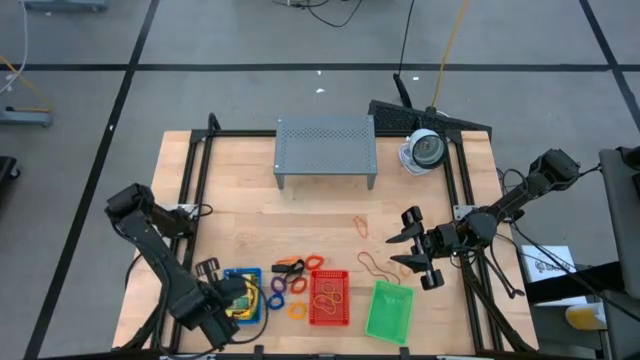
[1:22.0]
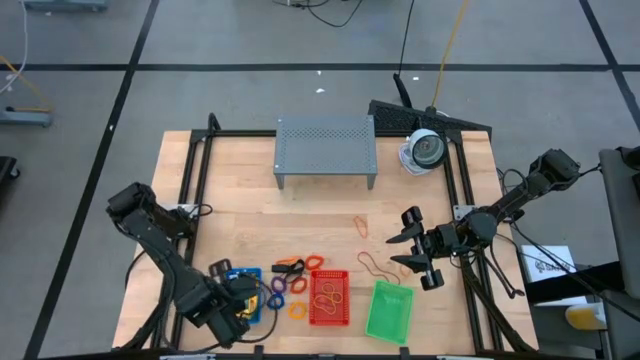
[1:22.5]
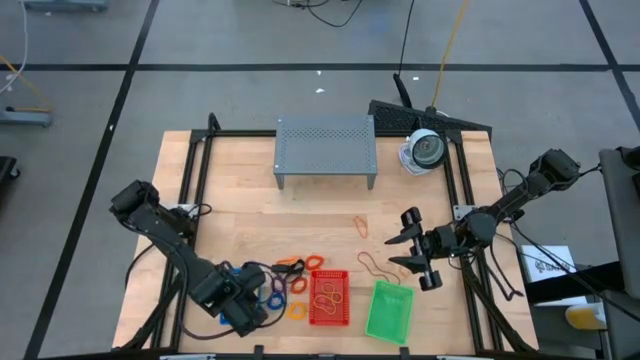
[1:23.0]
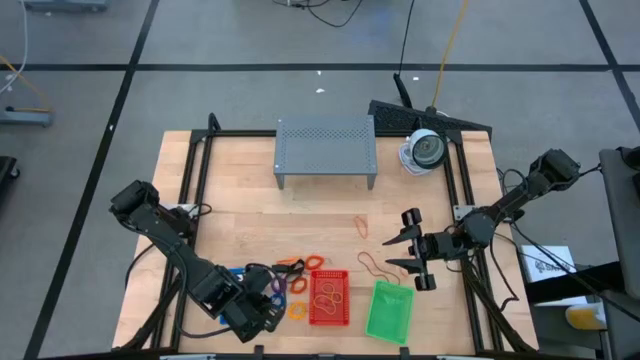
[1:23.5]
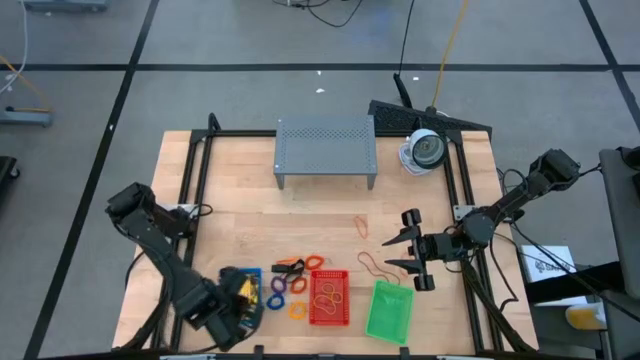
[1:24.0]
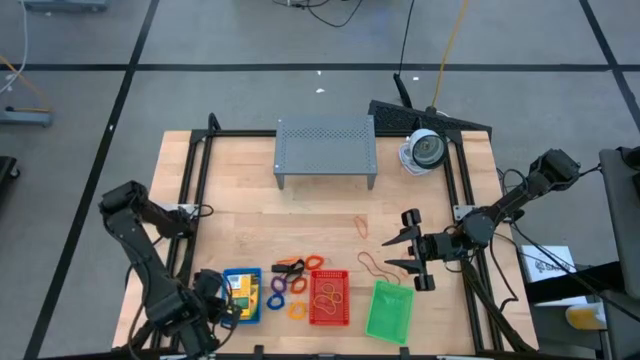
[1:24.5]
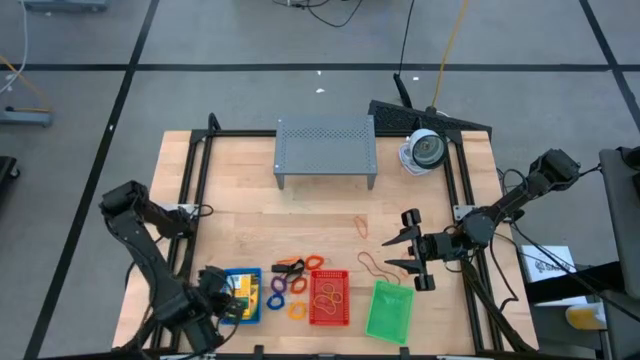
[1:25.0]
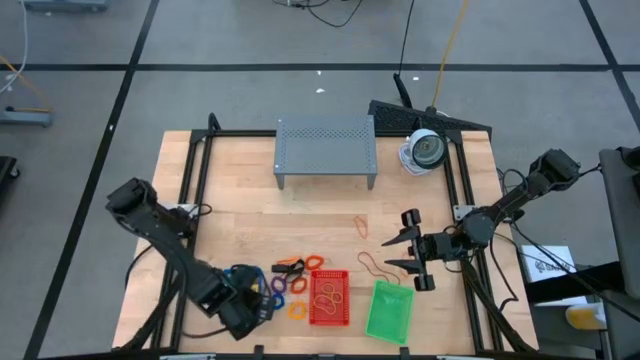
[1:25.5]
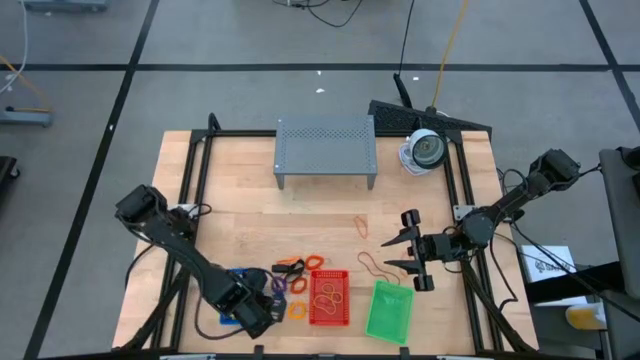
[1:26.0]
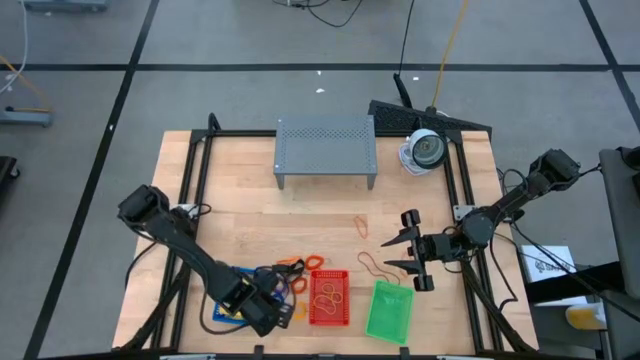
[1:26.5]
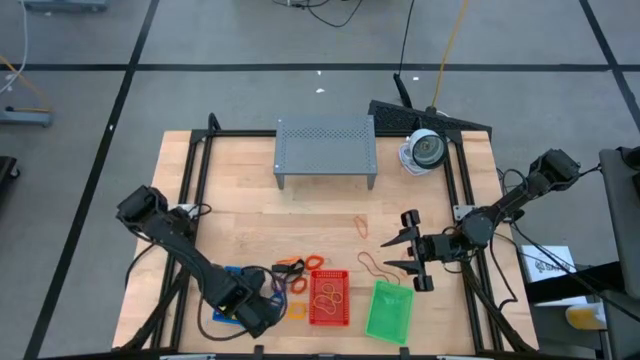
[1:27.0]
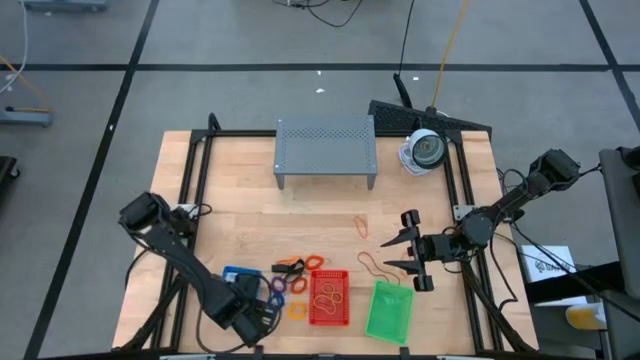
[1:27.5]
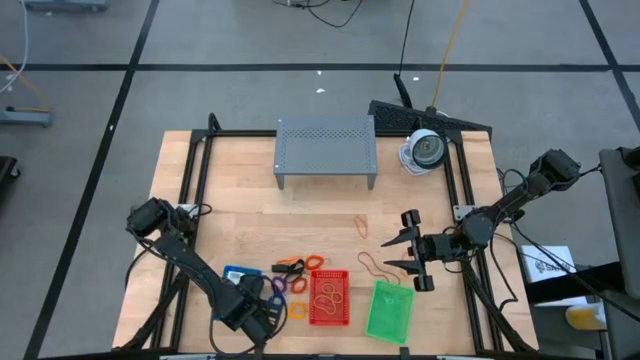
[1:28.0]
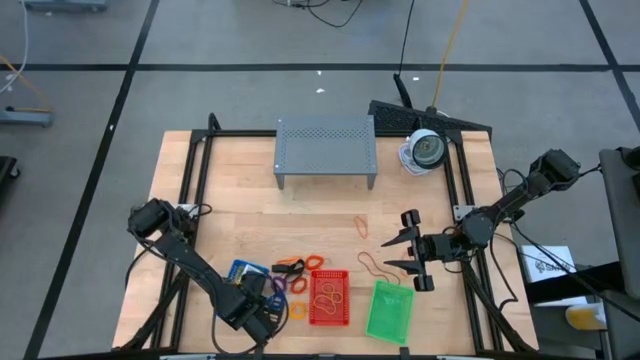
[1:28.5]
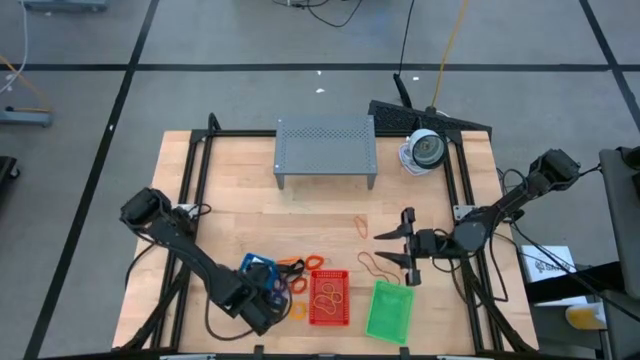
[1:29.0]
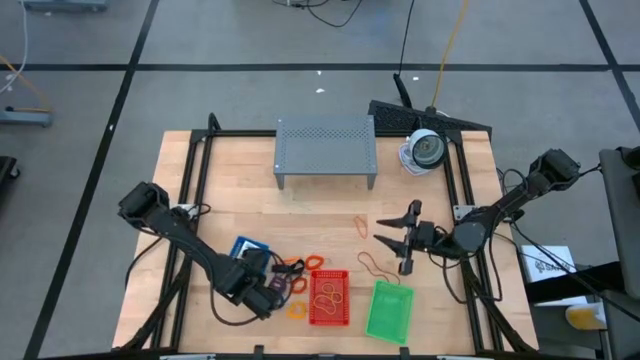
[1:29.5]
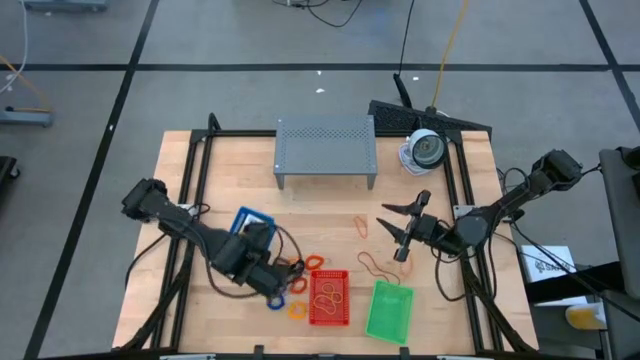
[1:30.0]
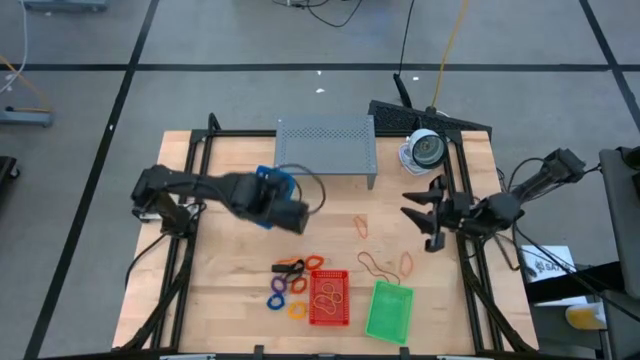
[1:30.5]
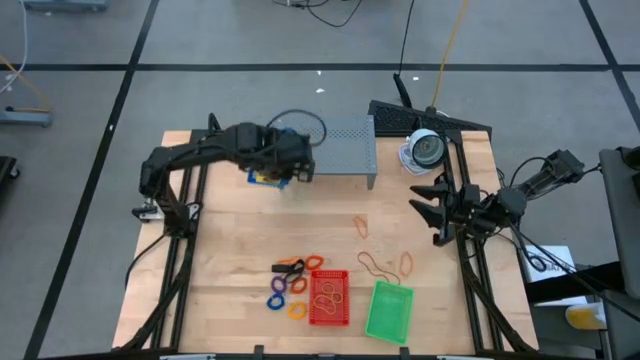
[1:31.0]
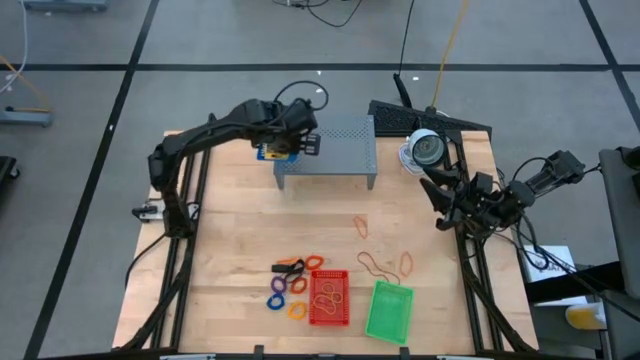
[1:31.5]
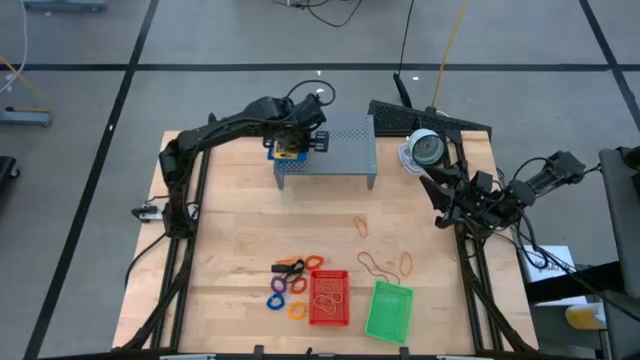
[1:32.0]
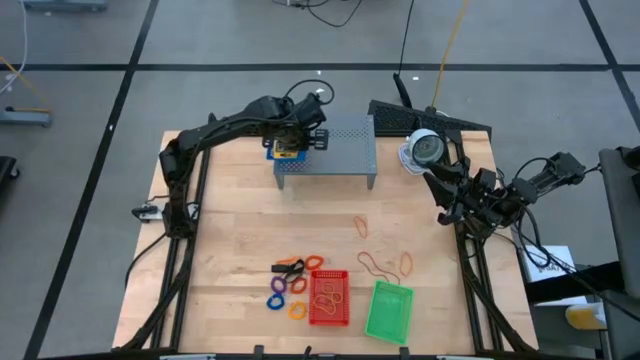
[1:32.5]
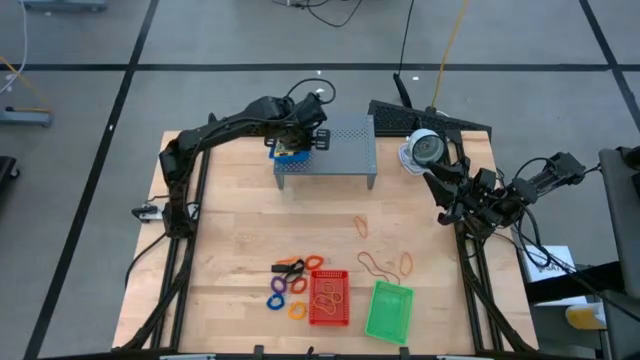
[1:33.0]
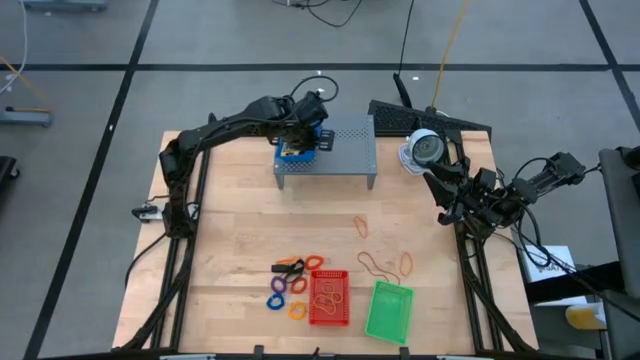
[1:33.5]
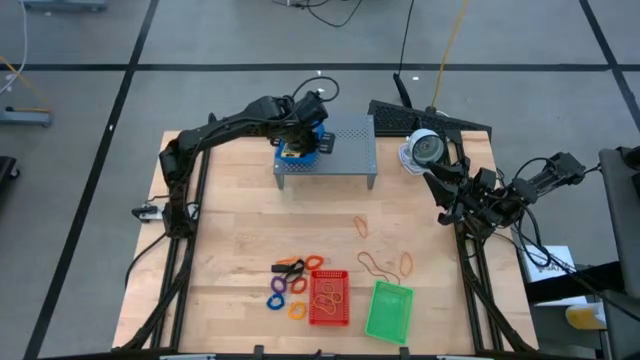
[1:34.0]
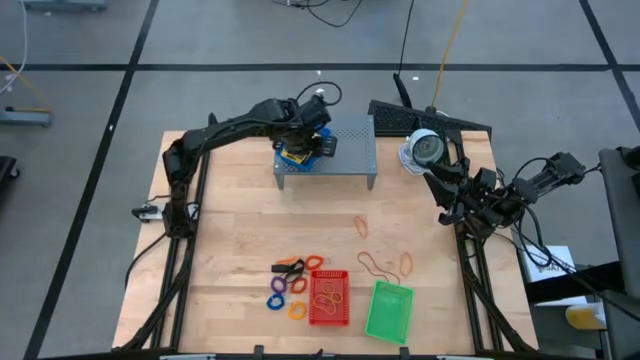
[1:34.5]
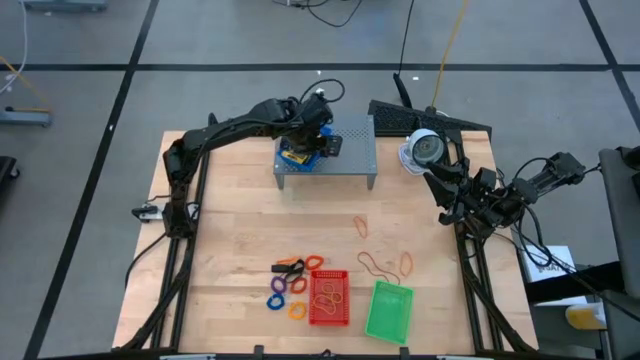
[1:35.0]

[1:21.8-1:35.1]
Task: Pick & Place Office Desk Supplies
Put the blue bin on the shelf

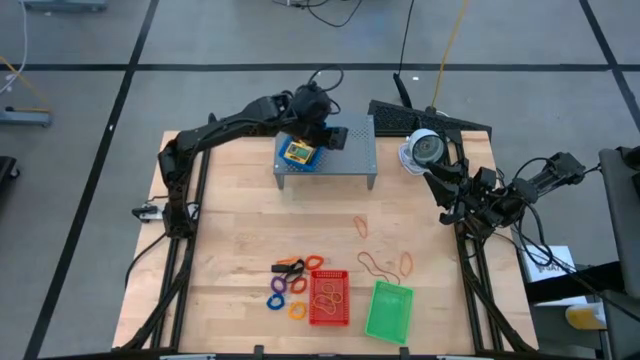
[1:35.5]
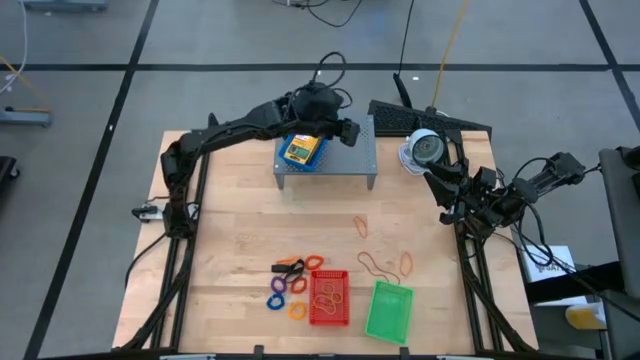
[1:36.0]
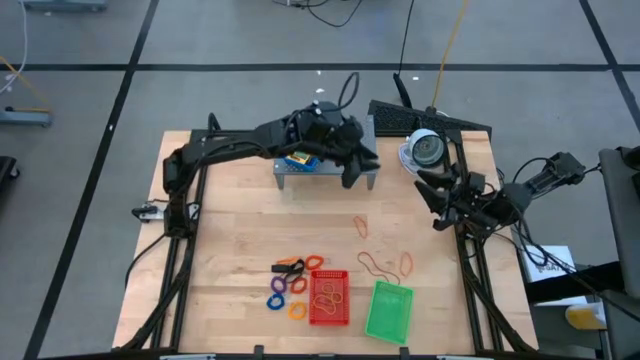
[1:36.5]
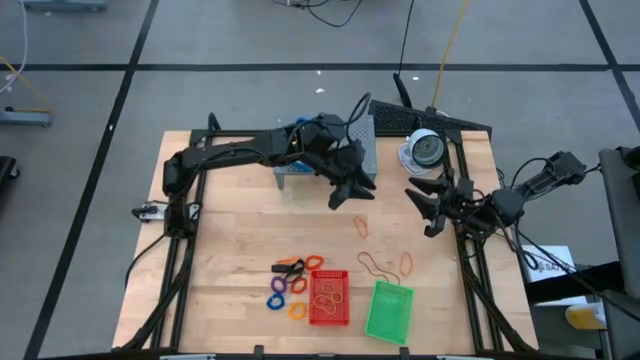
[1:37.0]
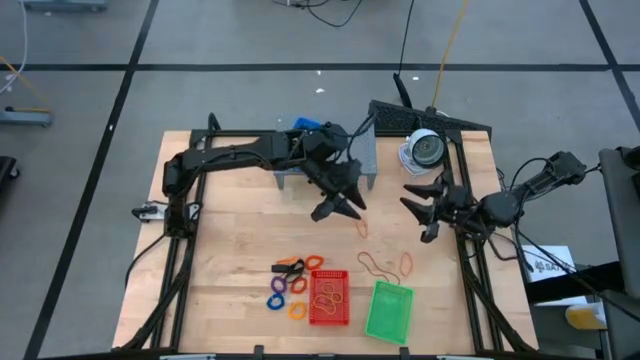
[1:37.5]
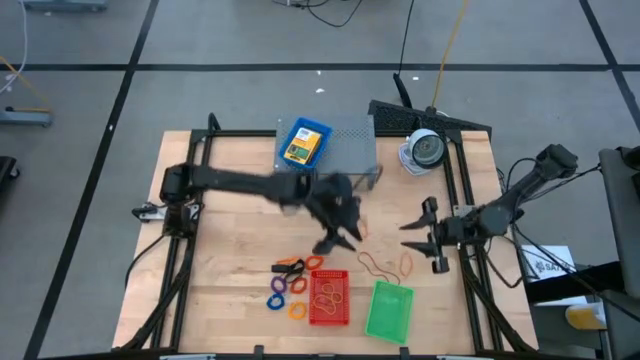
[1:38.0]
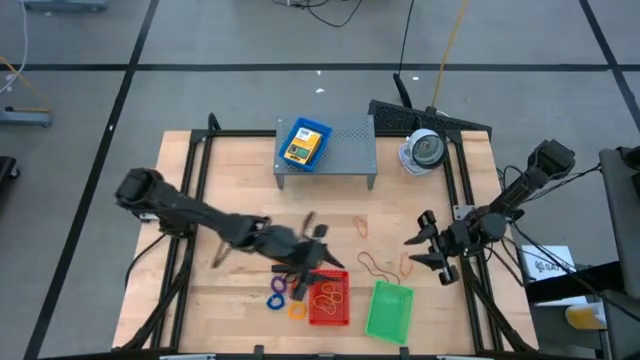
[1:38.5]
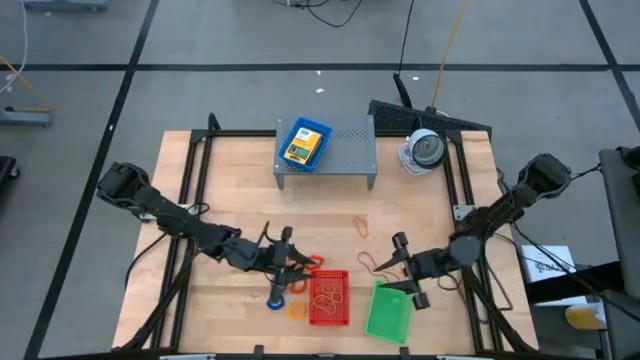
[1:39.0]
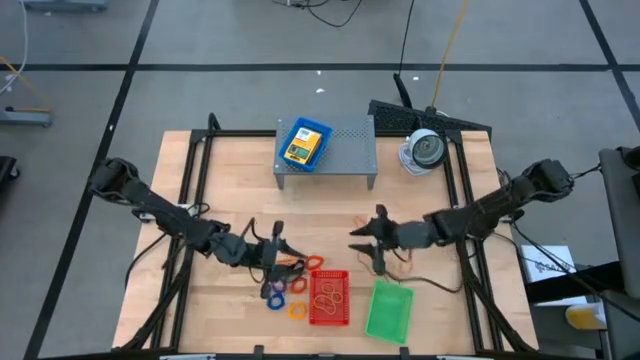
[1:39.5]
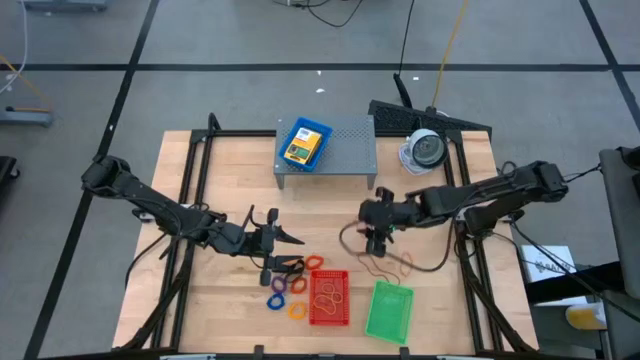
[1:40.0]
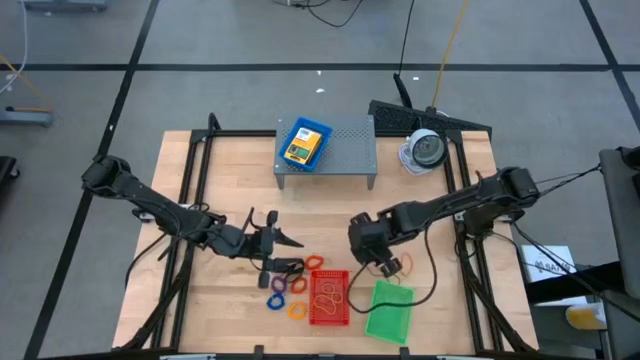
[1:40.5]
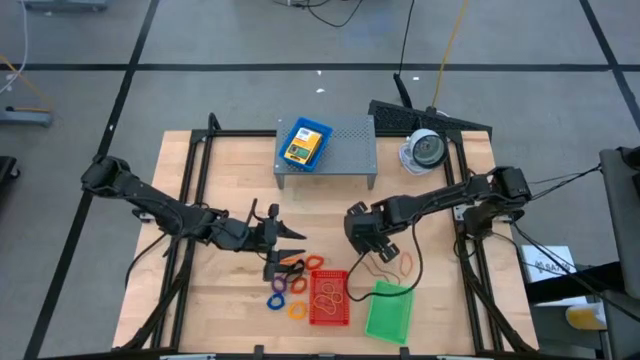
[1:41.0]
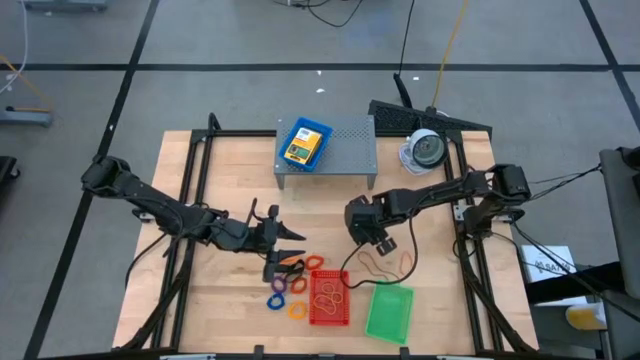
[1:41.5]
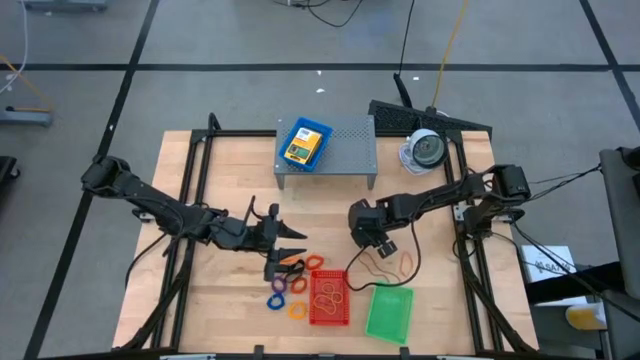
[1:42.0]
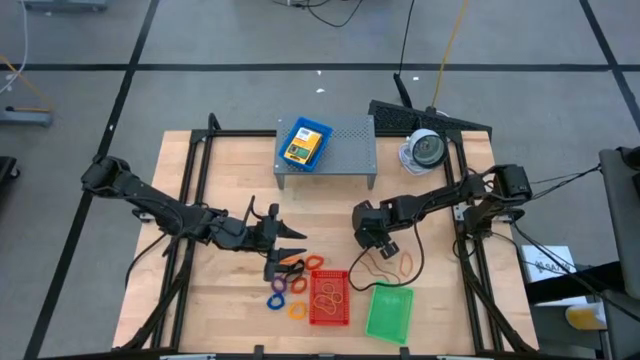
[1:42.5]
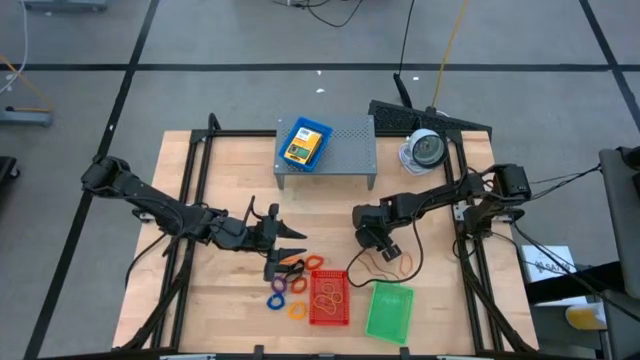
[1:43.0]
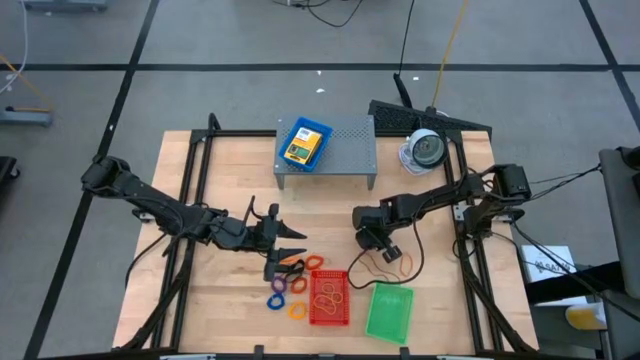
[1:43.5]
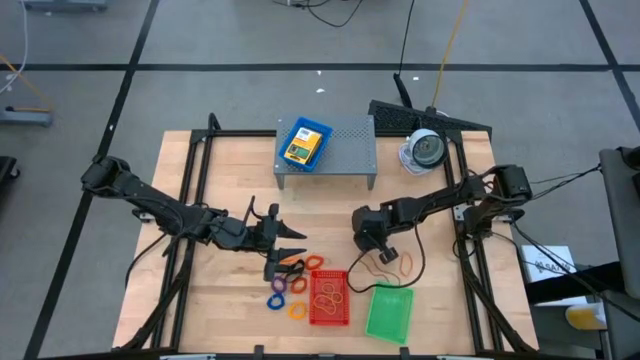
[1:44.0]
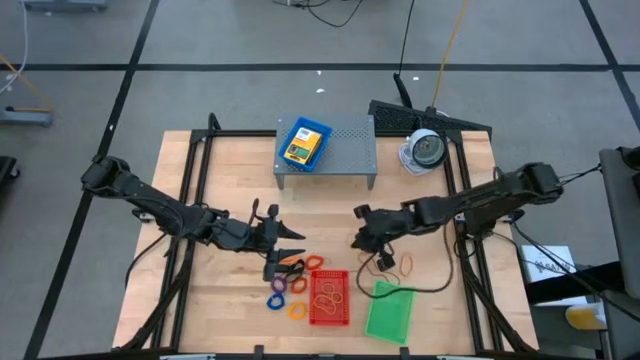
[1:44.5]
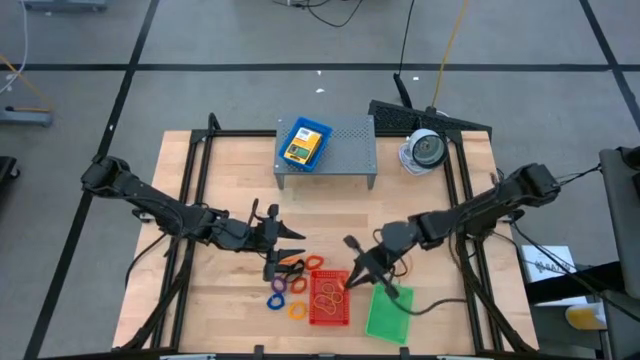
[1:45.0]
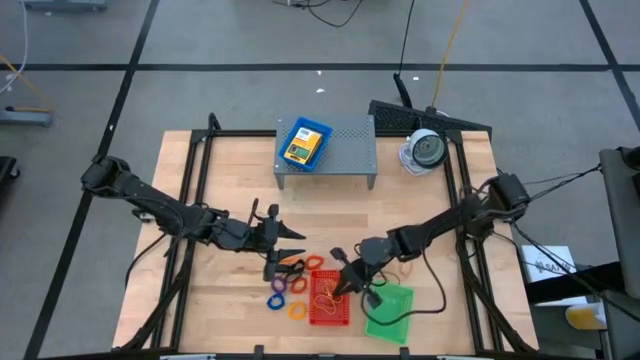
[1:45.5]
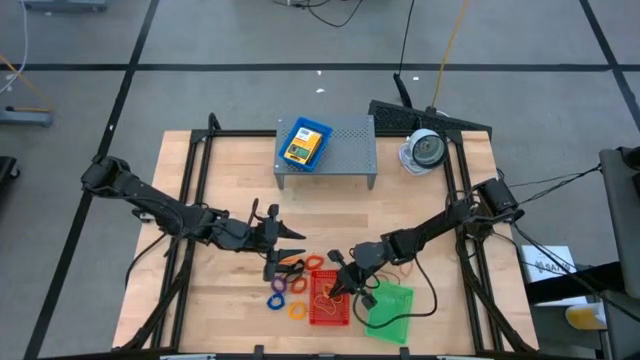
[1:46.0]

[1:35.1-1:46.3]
Put the orange rubber band into the red bin
